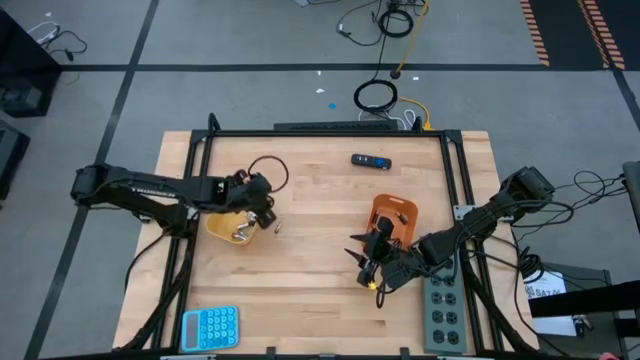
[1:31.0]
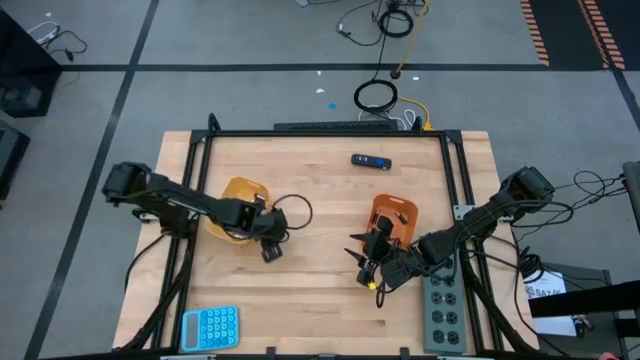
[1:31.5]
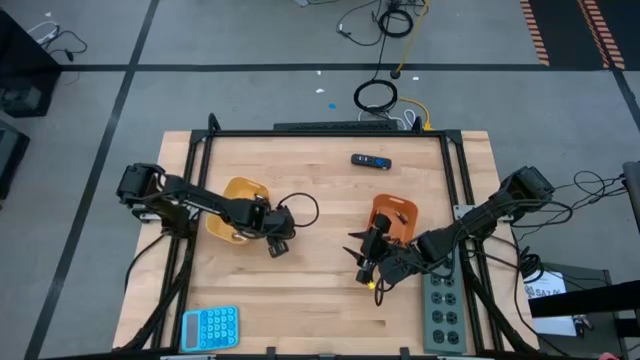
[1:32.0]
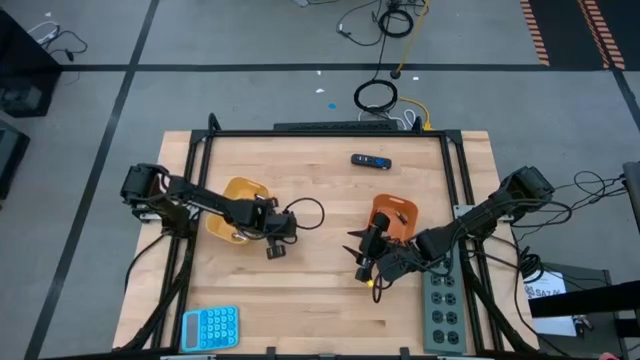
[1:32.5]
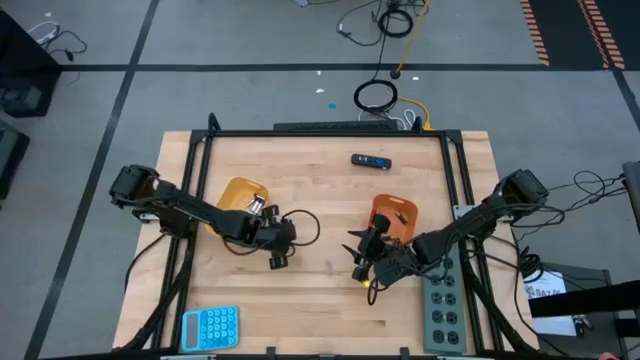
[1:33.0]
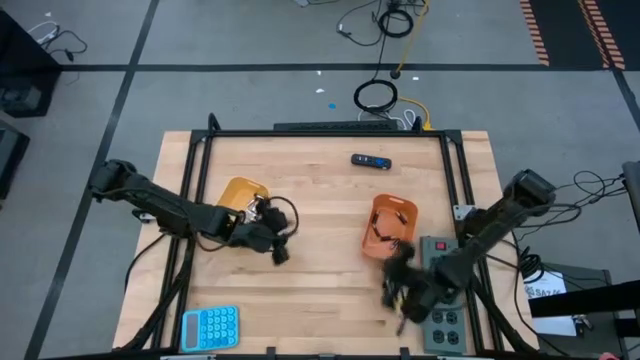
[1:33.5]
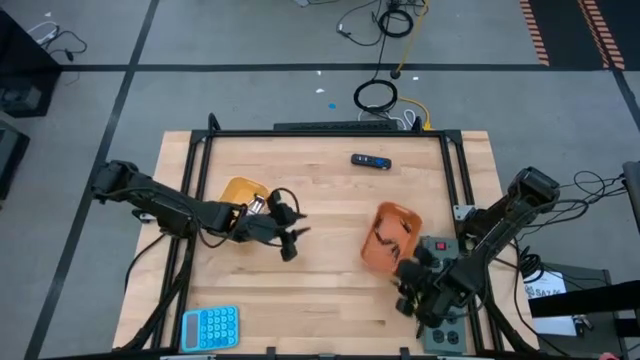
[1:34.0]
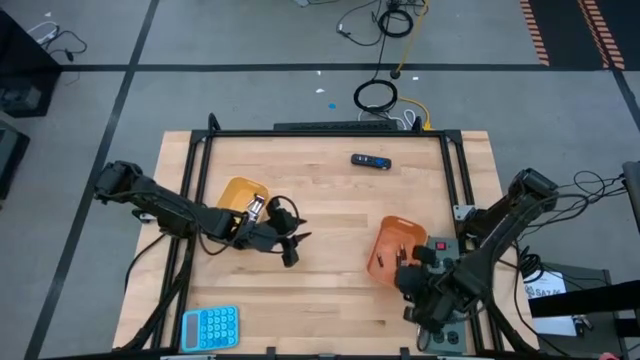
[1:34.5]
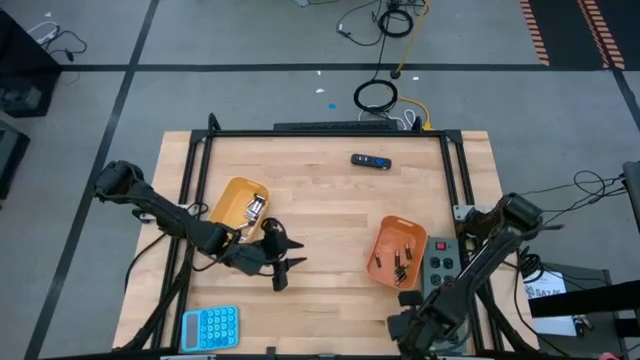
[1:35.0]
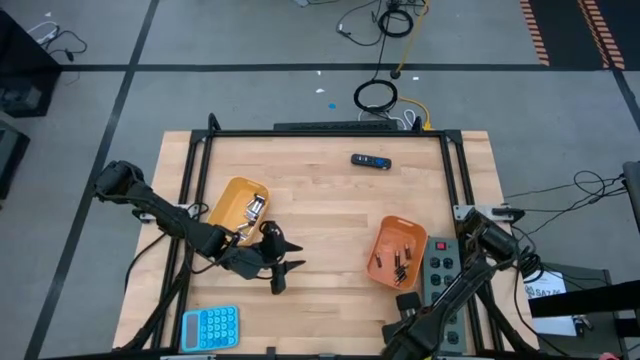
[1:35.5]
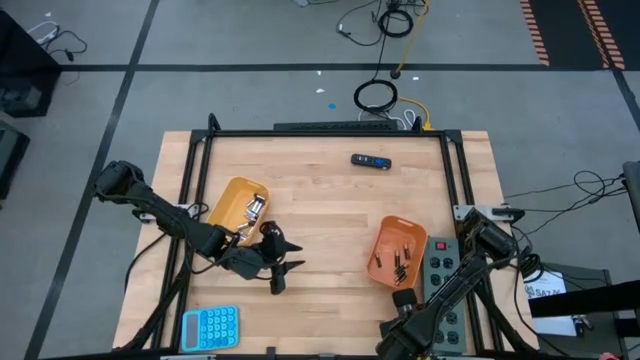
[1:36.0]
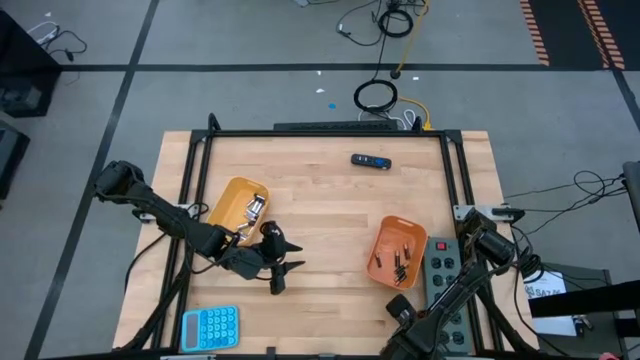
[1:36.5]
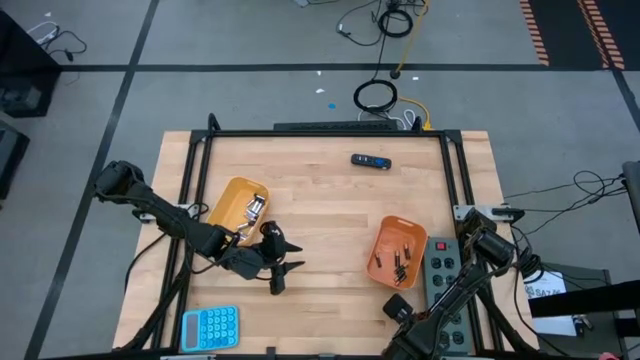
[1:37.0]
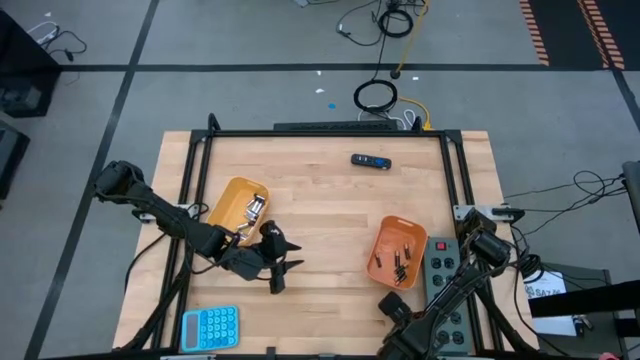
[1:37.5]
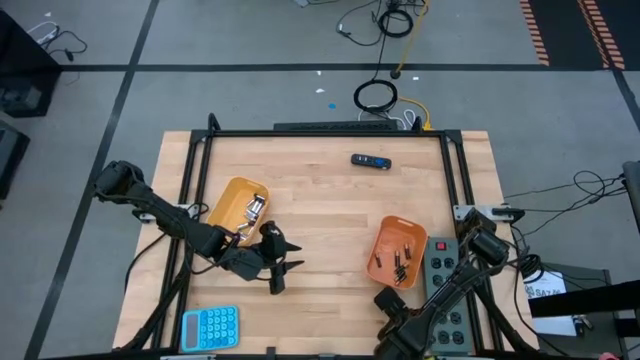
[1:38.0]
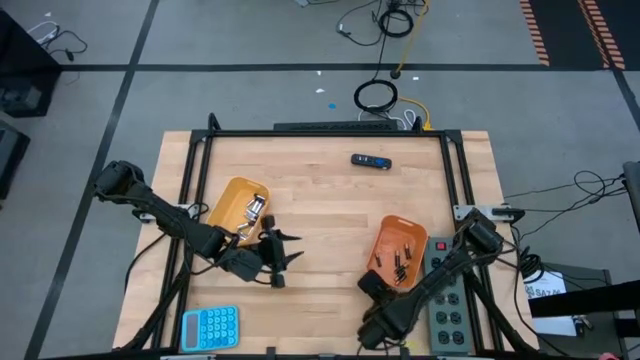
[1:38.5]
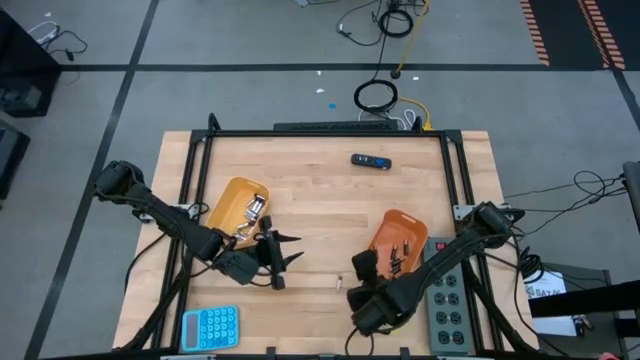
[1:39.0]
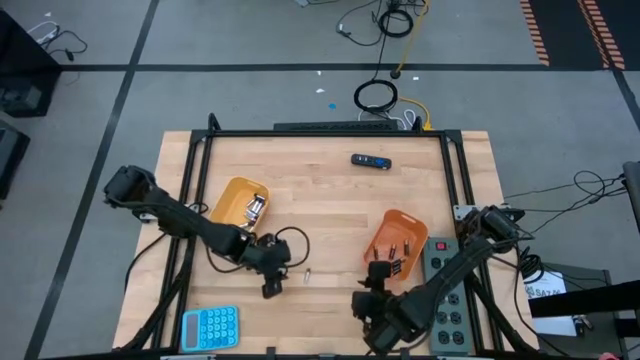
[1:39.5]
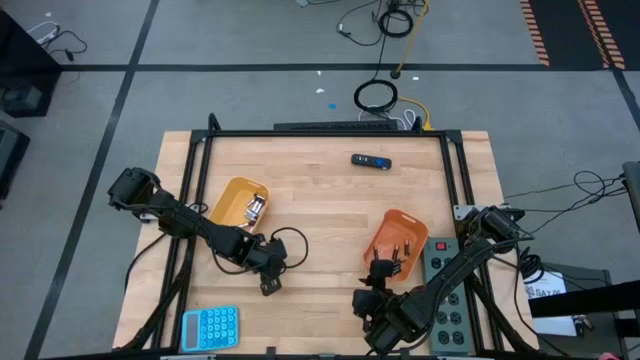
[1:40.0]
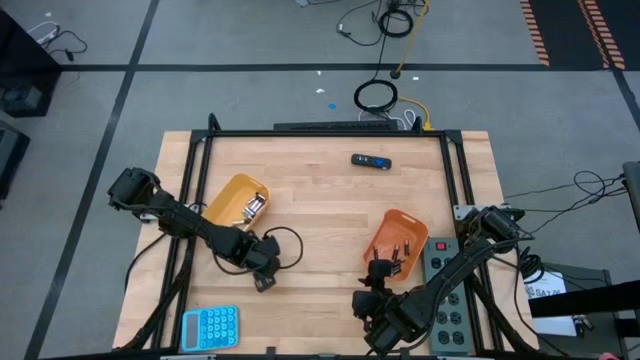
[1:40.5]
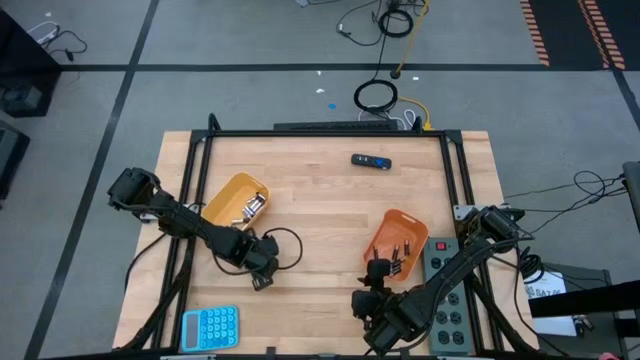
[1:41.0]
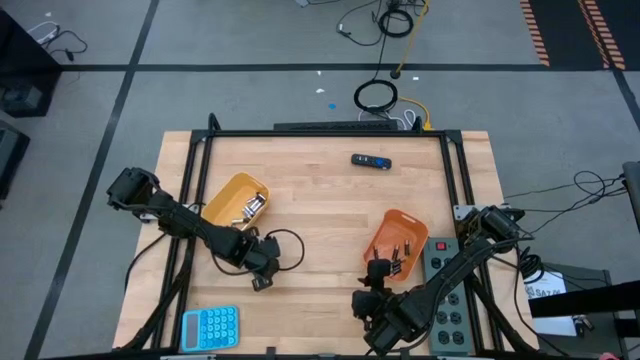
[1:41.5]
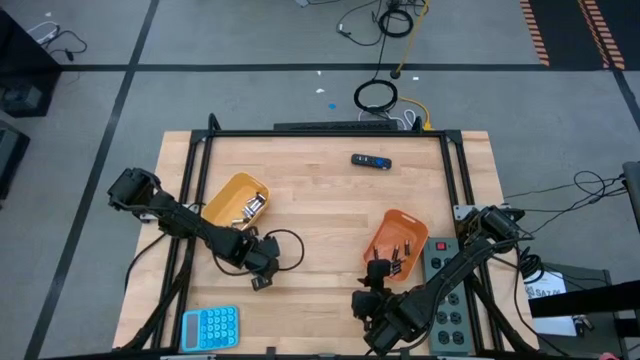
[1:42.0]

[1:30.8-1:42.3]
Task: Sort batteries
Put the silver battery into the yellow bin

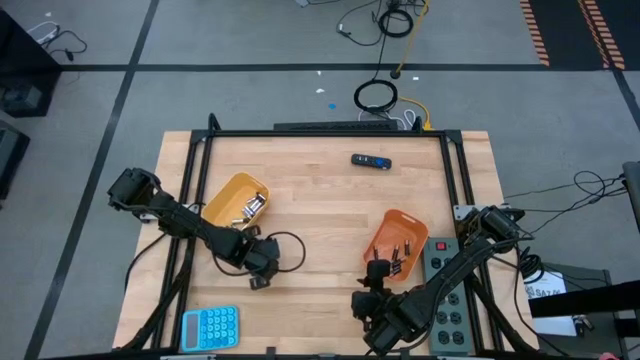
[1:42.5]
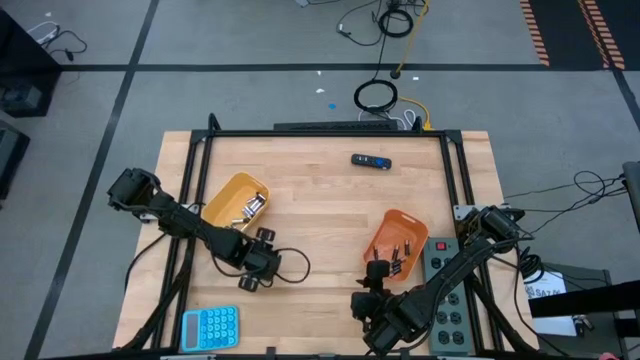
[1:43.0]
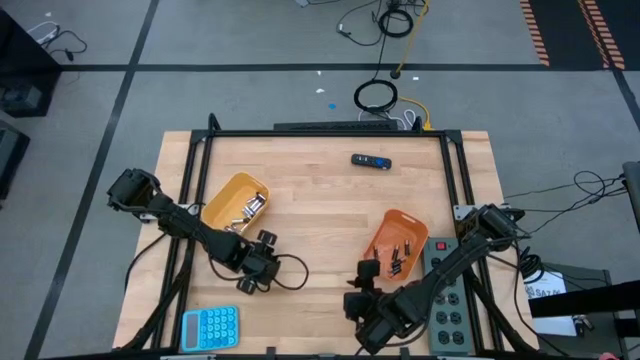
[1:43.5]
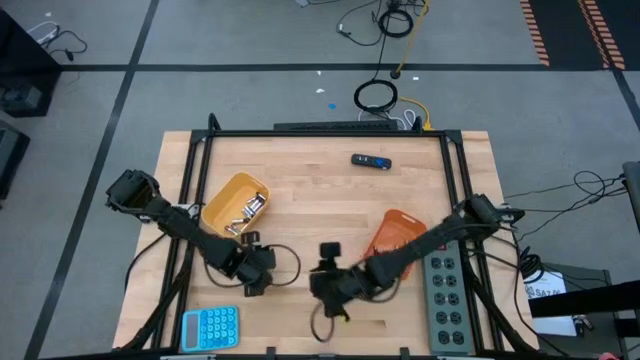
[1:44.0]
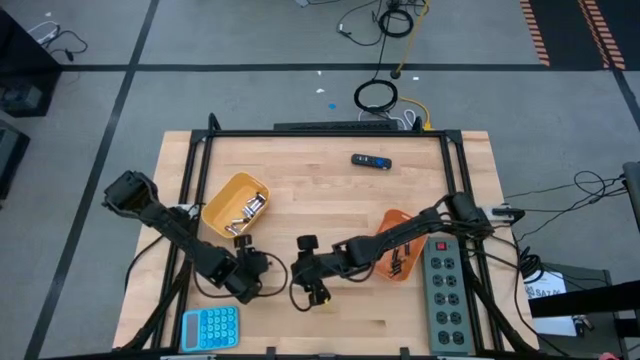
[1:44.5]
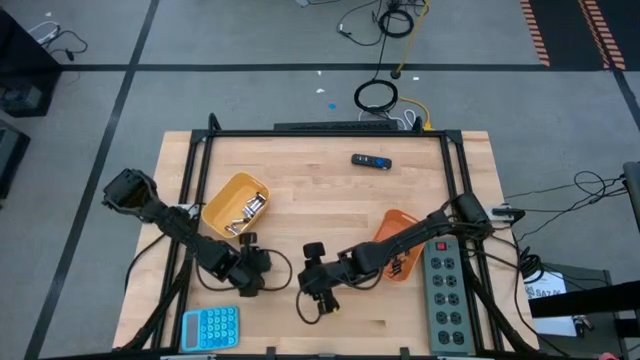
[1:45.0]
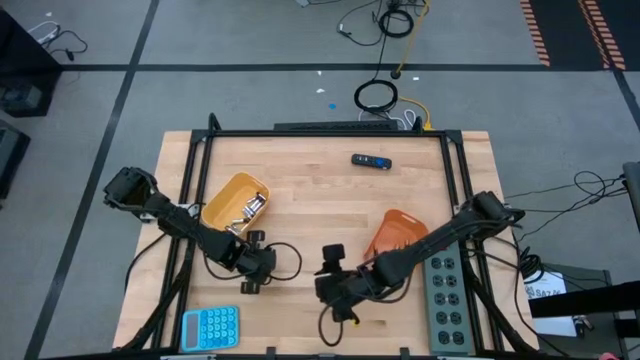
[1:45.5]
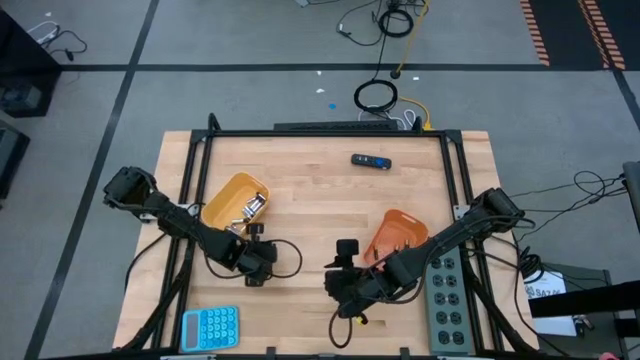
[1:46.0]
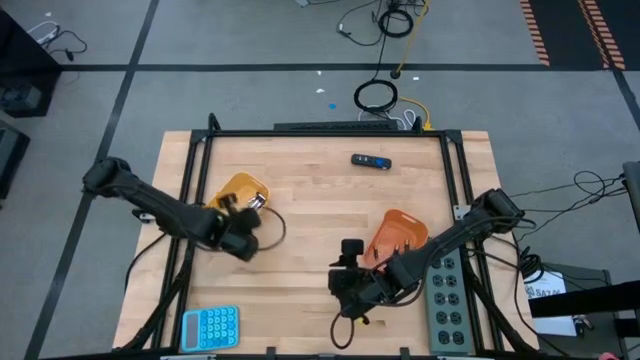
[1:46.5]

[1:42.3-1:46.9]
Put the silver battery into the yellow bin

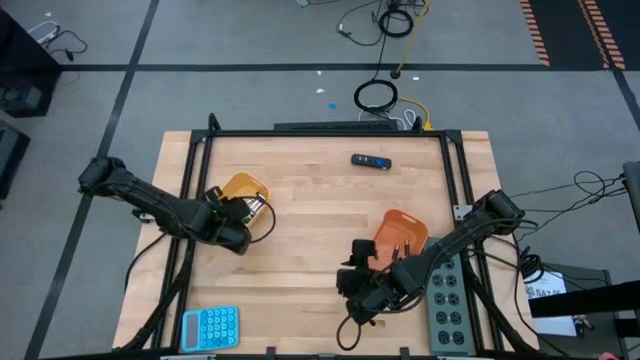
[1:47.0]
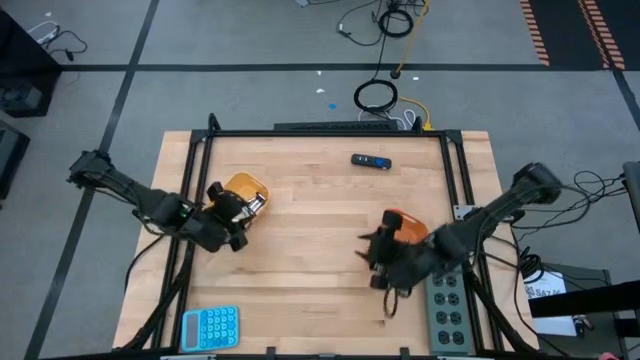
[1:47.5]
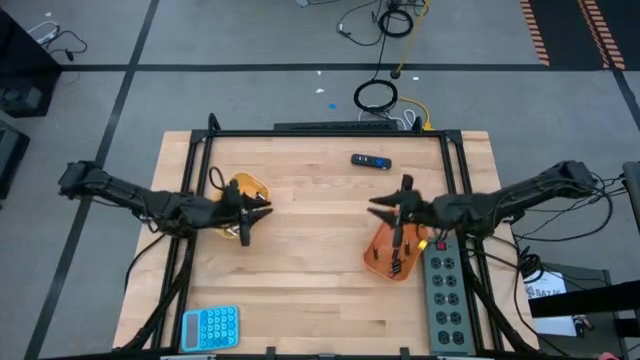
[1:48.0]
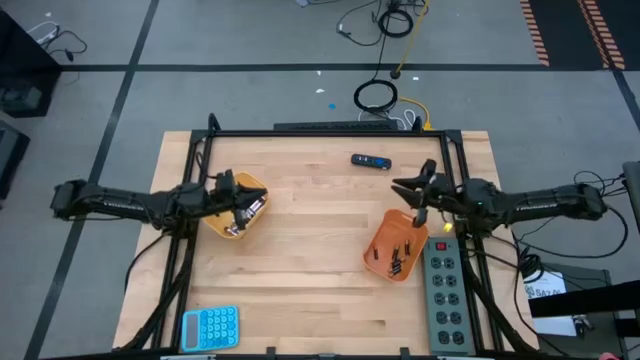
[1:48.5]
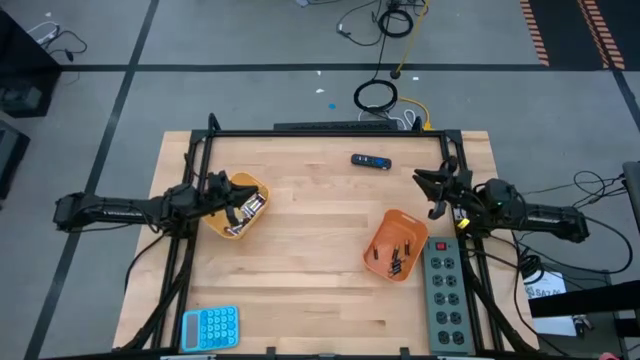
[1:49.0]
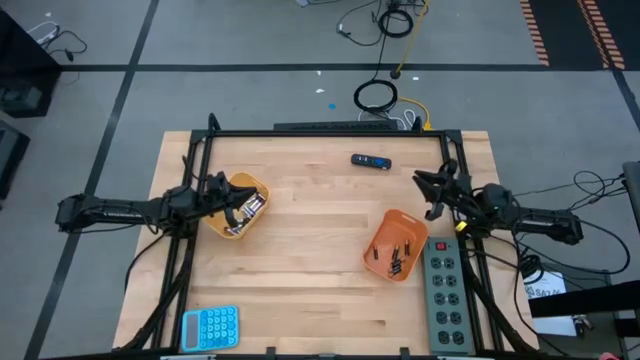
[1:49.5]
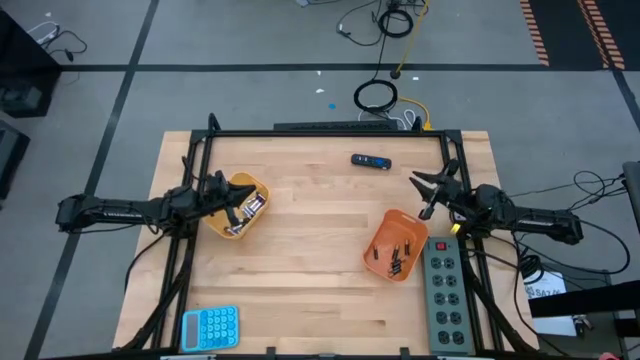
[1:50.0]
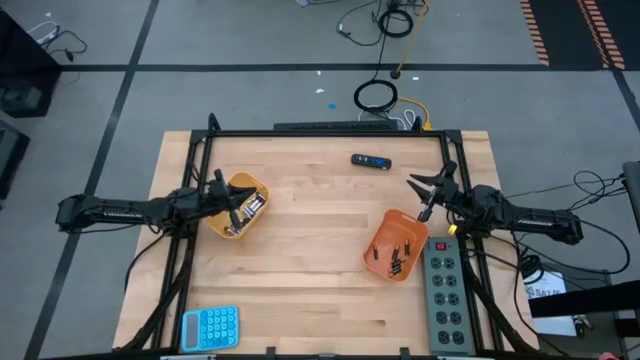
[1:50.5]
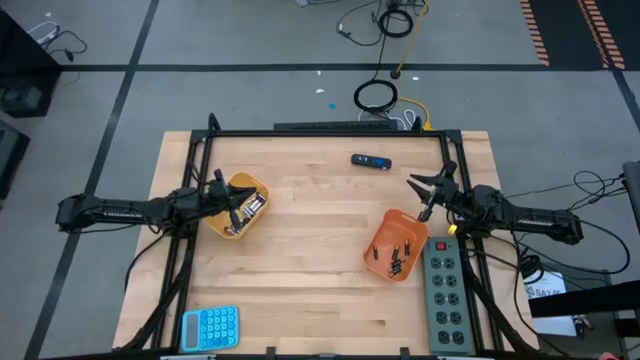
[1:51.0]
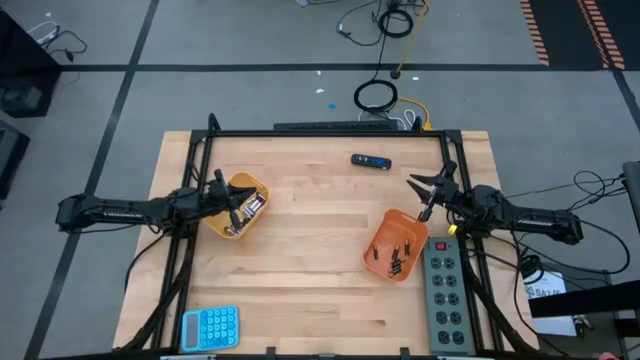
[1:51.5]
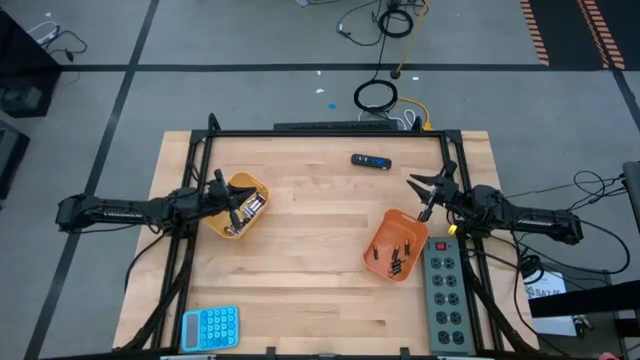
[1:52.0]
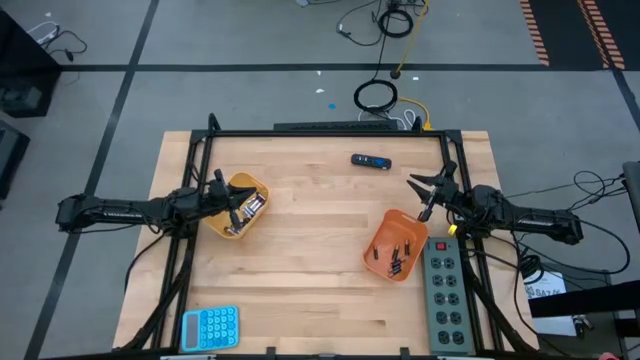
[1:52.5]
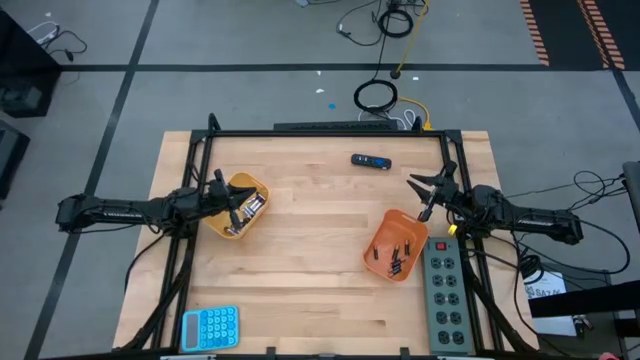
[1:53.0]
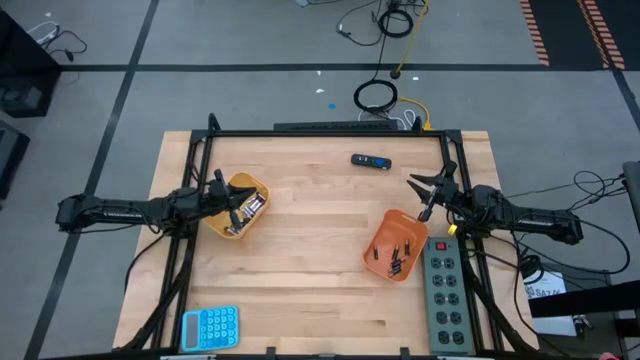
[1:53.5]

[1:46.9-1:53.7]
Return to Home Position
